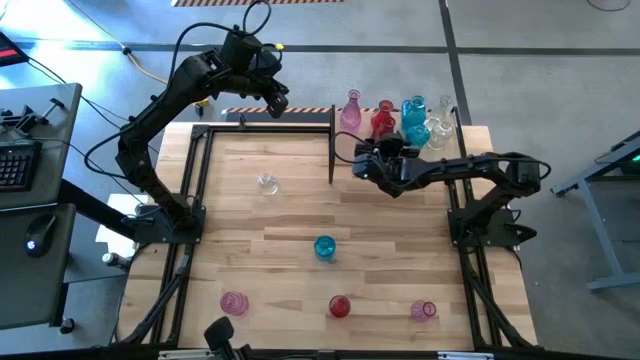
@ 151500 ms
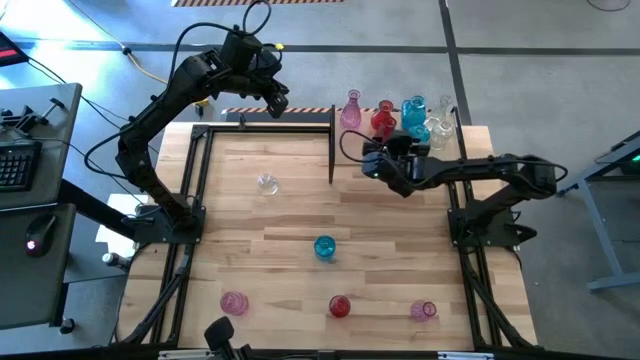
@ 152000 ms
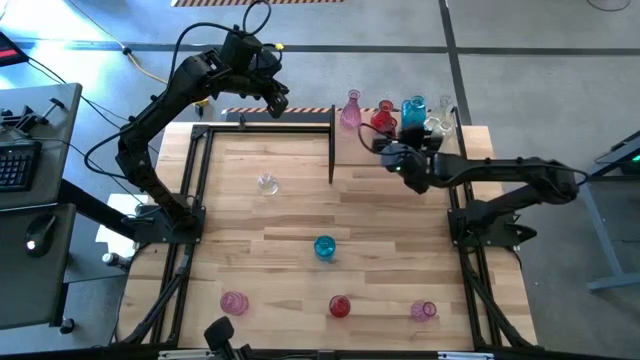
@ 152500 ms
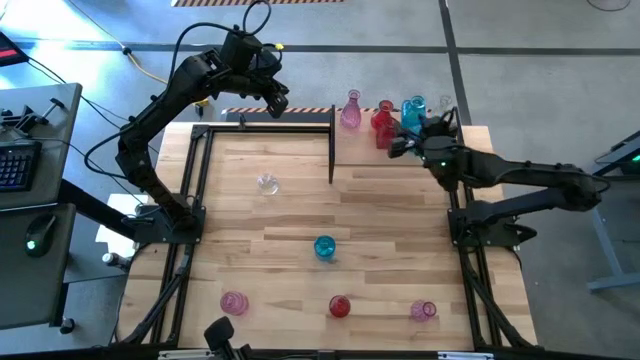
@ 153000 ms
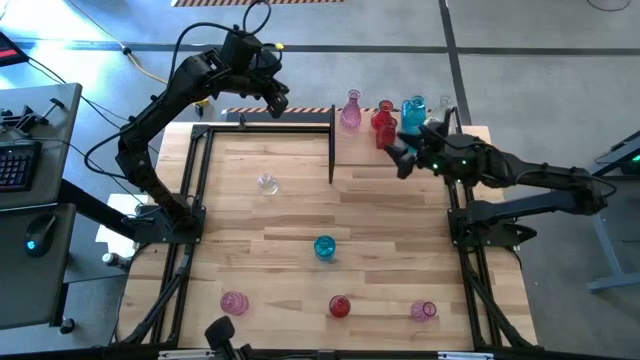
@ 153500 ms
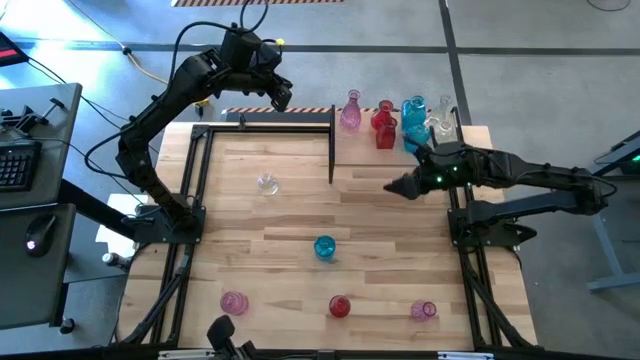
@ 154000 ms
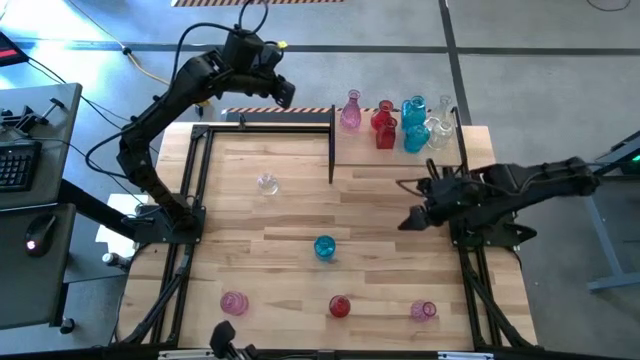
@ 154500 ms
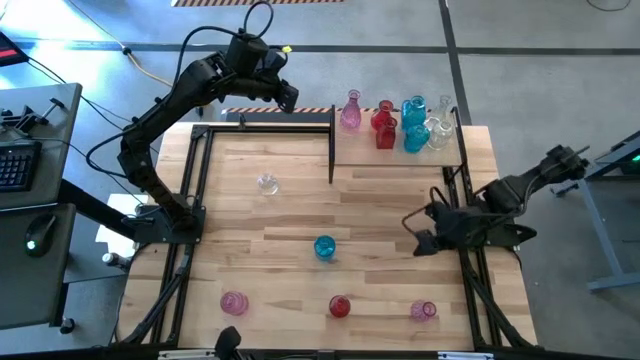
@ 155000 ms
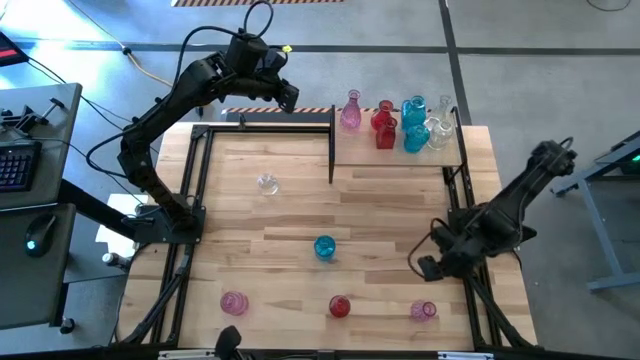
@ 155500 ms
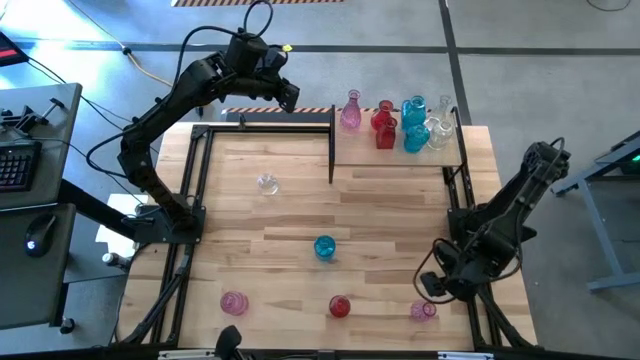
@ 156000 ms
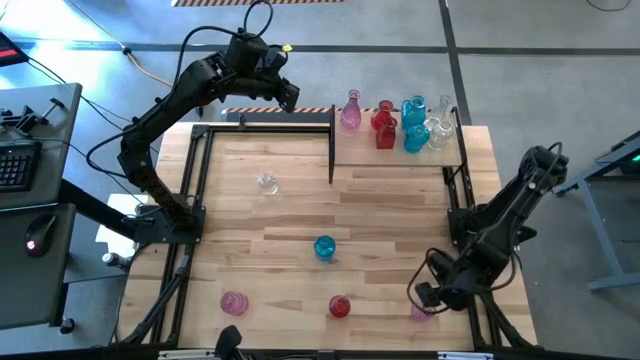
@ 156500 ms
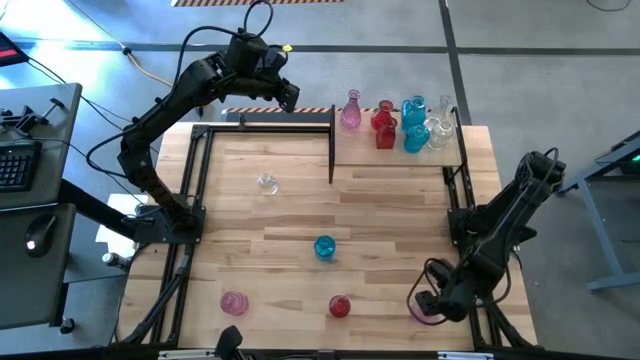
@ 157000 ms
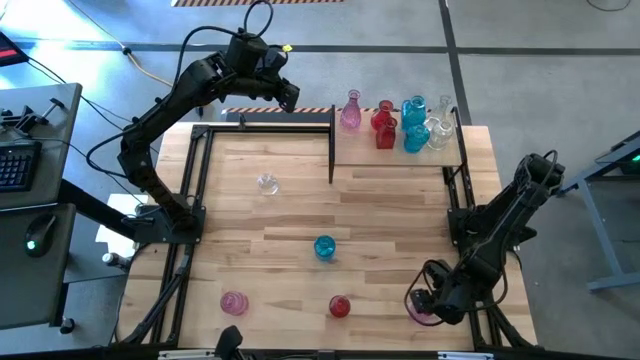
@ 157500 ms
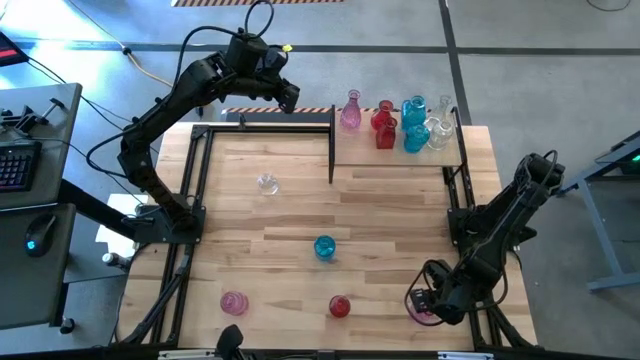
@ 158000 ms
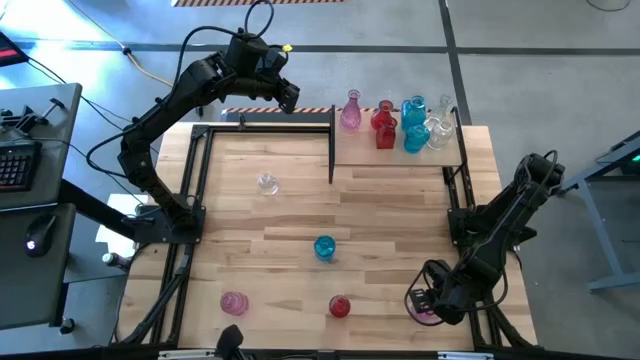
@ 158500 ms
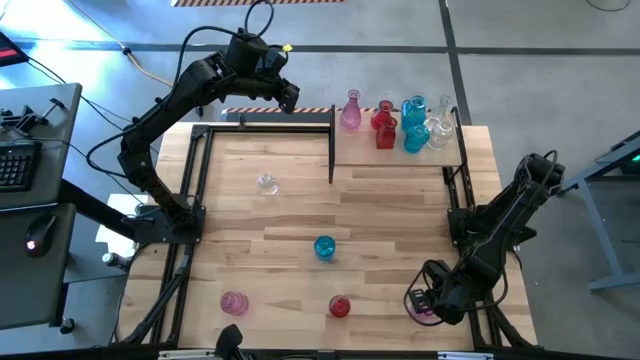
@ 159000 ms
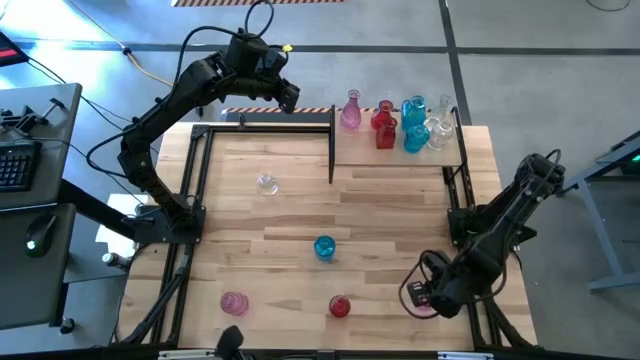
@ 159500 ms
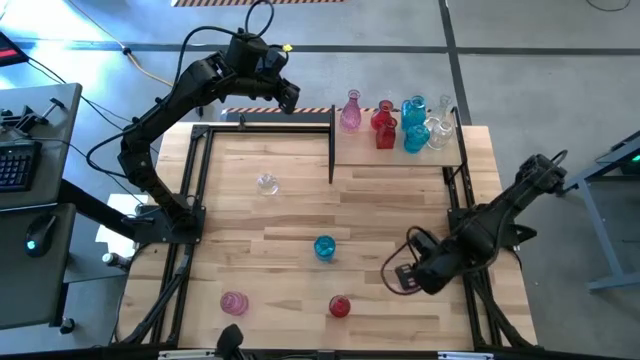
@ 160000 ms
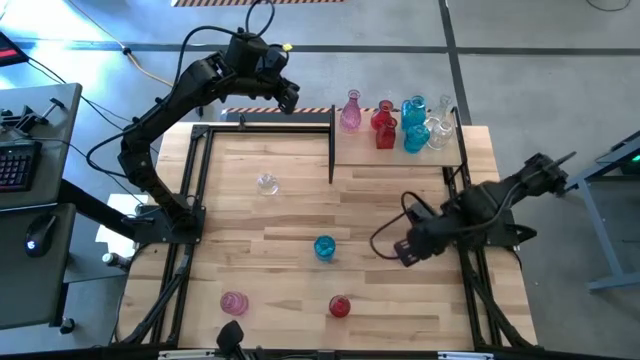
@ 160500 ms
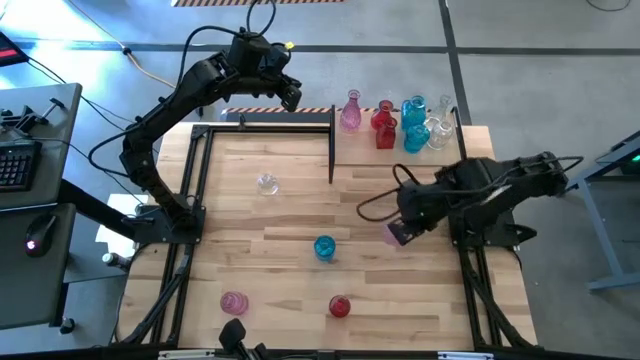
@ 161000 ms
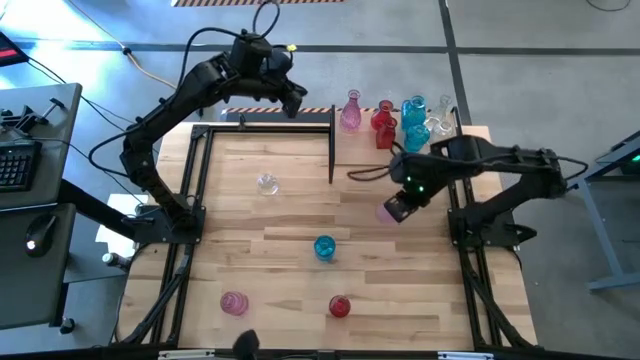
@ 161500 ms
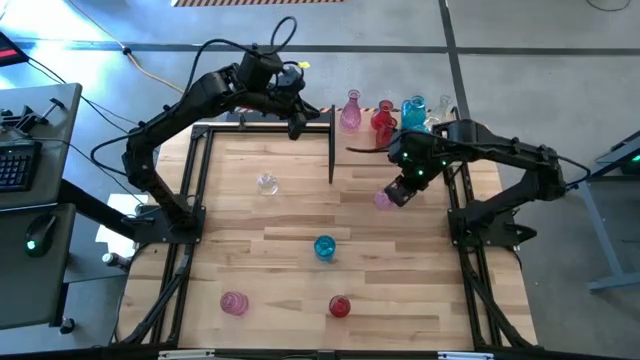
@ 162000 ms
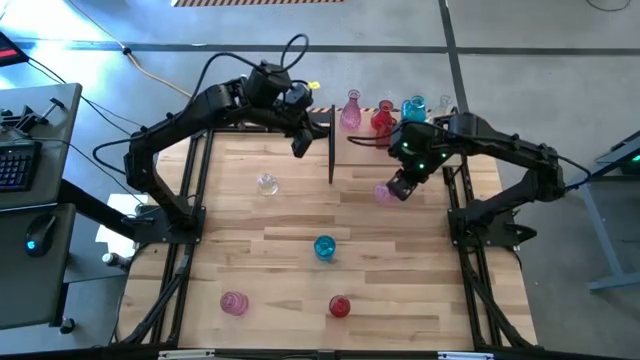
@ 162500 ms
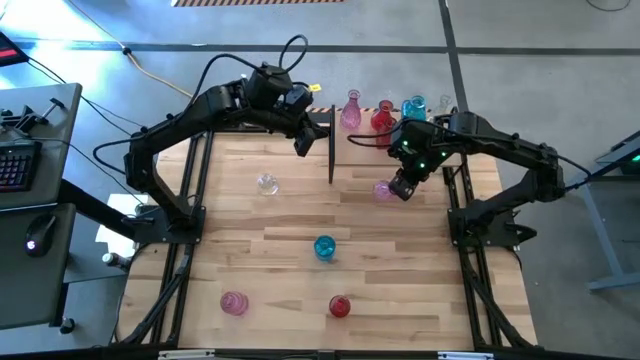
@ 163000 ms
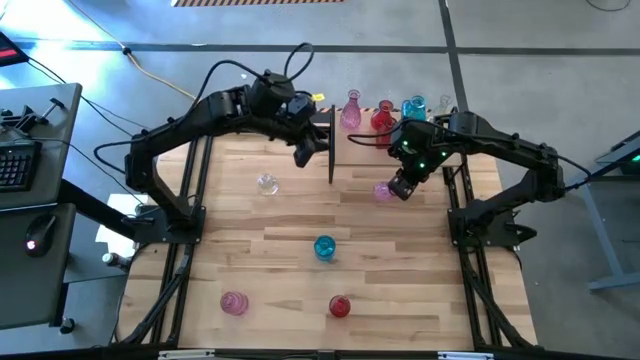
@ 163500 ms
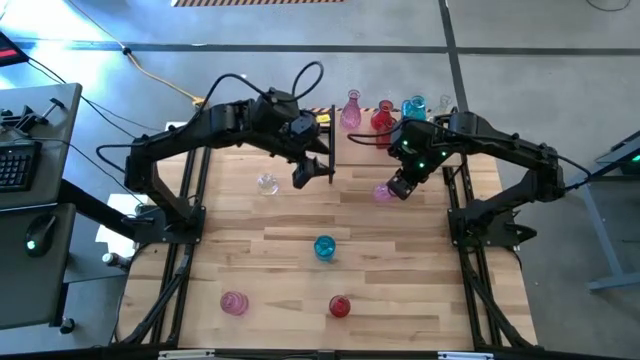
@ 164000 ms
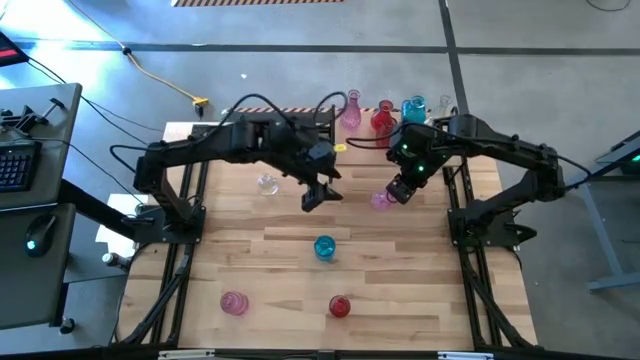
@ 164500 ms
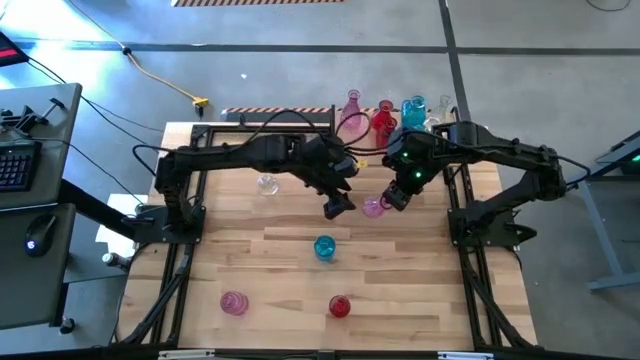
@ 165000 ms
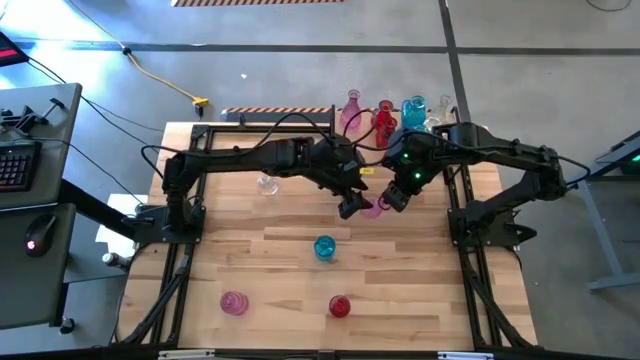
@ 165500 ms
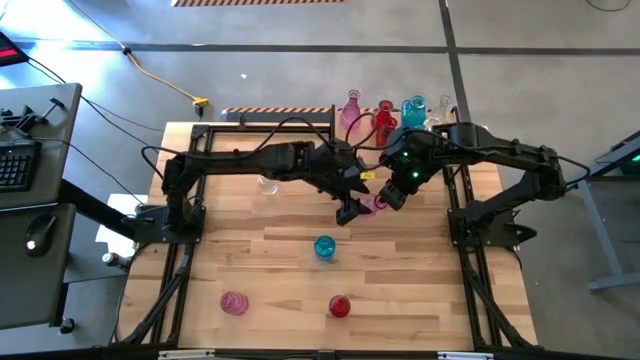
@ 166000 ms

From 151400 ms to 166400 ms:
Task: sort vases onto shelf
Put the right pink vase on the shelf aligned with the pink vase

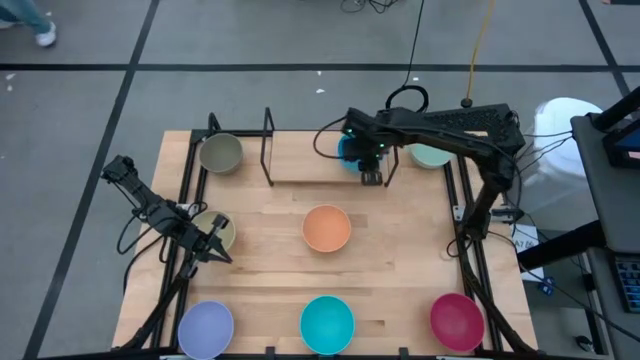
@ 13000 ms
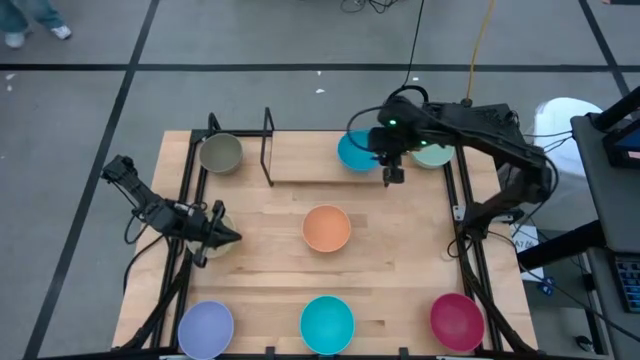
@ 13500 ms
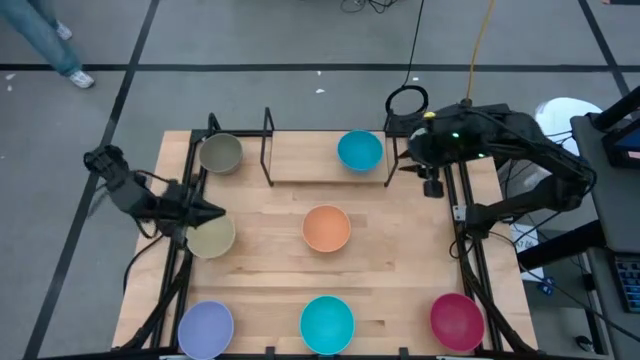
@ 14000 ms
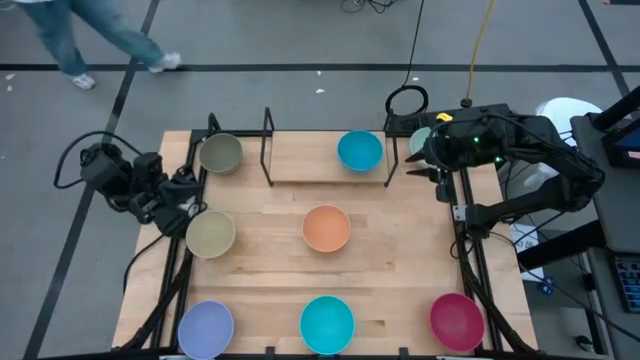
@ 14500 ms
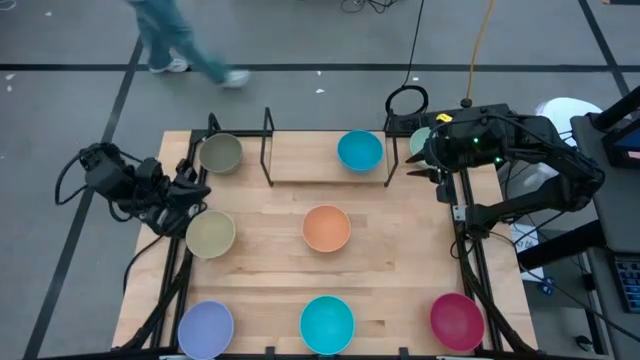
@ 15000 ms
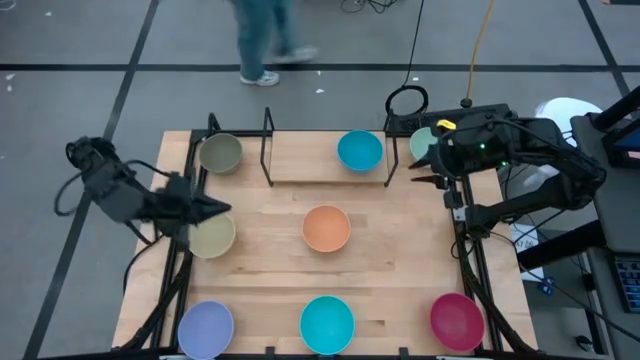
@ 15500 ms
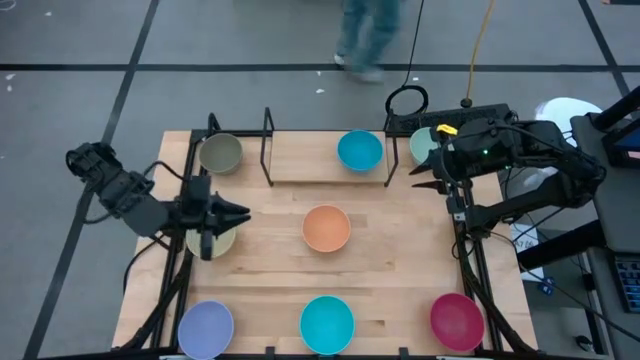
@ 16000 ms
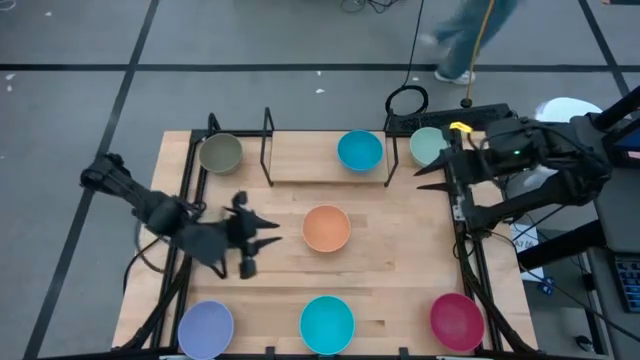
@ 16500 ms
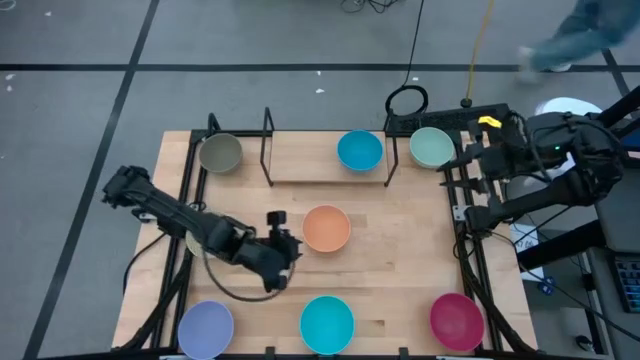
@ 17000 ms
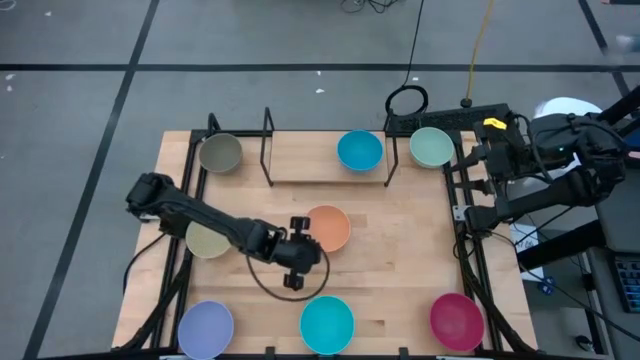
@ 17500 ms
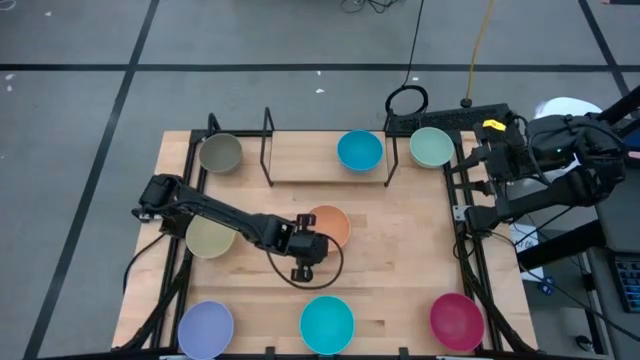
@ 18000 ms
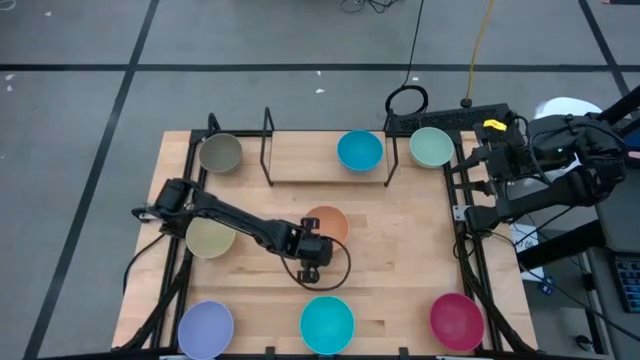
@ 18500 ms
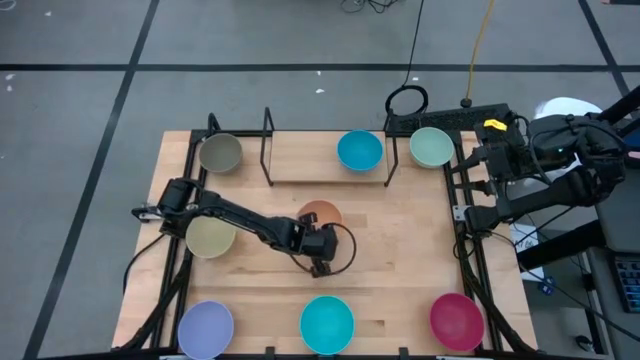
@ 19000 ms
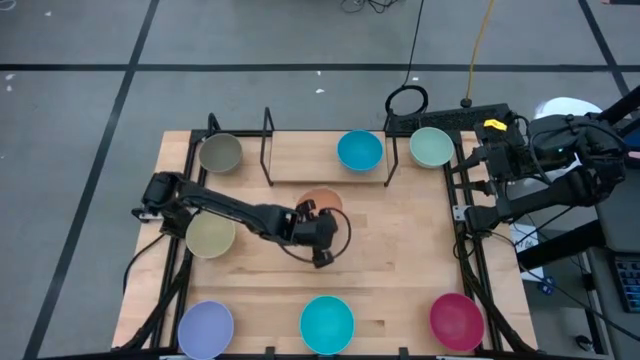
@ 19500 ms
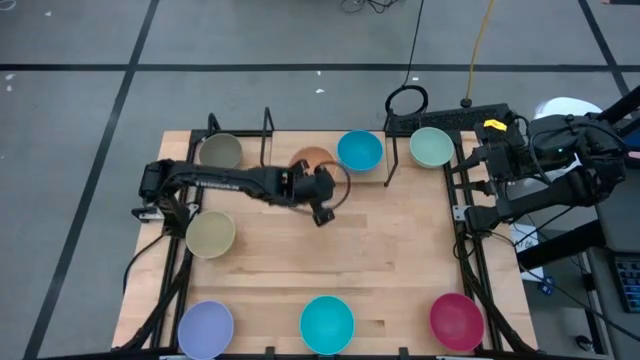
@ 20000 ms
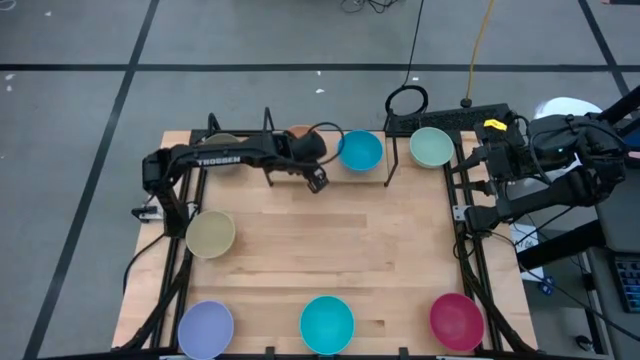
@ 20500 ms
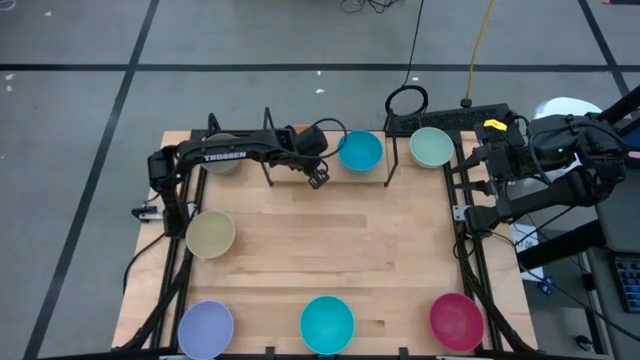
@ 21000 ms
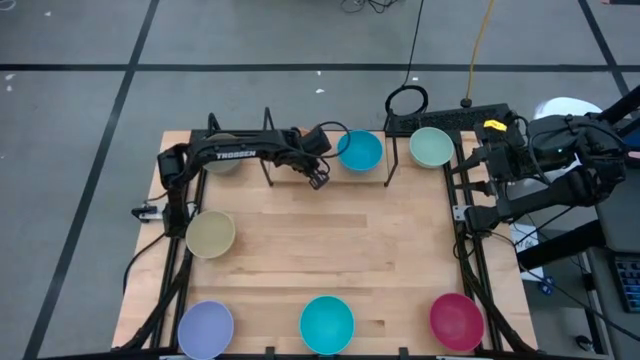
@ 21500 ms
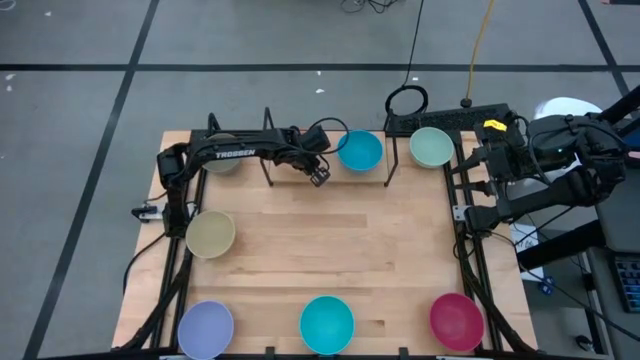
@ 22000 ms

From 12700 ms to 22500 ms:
Task: Place and stack bowls onto a shelf
Put the orange bowl on the shelf
